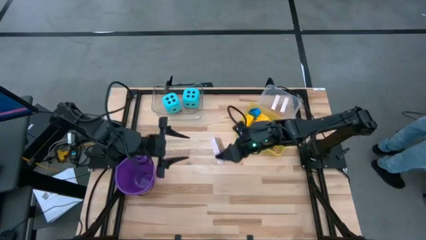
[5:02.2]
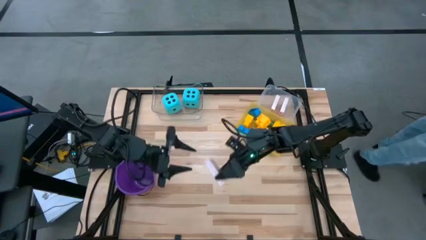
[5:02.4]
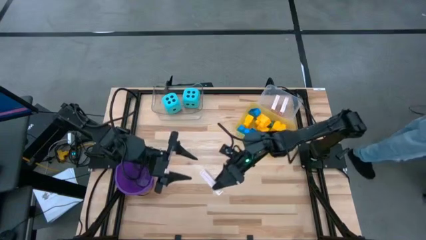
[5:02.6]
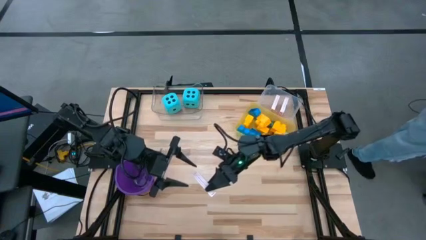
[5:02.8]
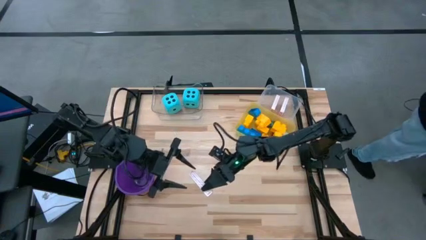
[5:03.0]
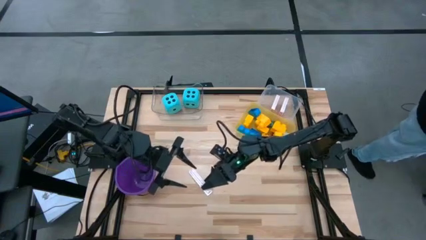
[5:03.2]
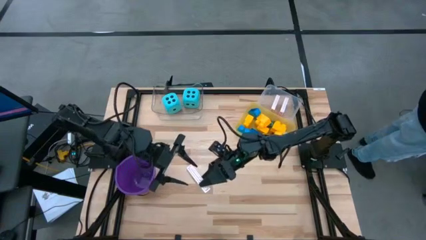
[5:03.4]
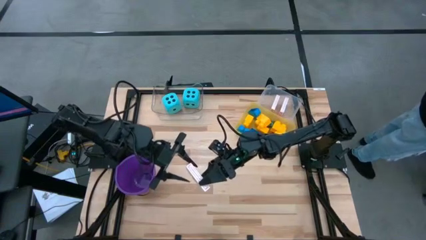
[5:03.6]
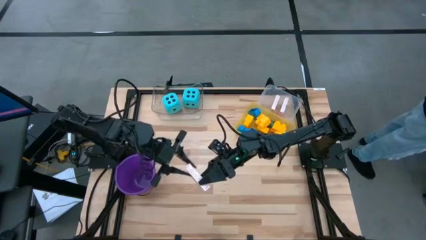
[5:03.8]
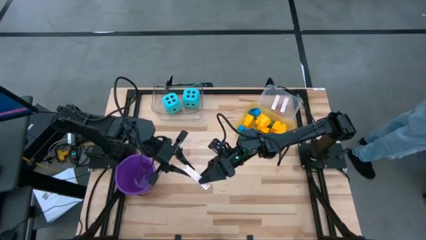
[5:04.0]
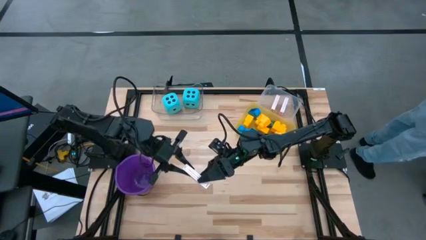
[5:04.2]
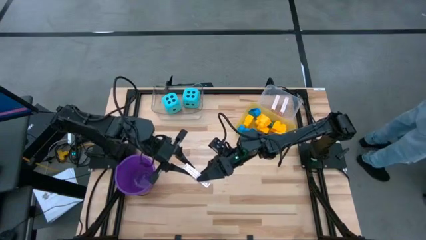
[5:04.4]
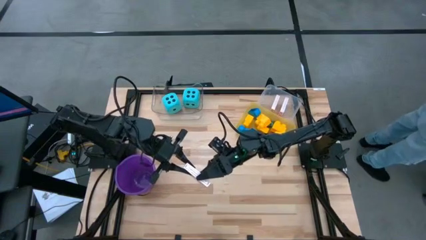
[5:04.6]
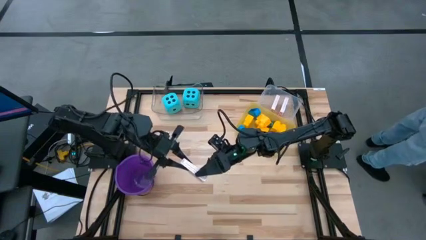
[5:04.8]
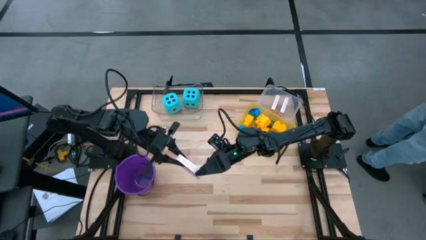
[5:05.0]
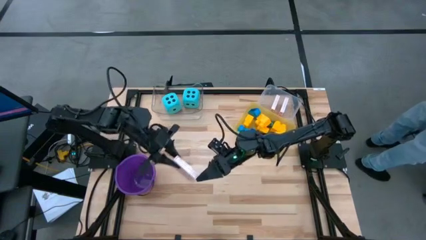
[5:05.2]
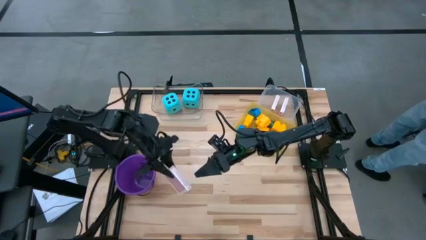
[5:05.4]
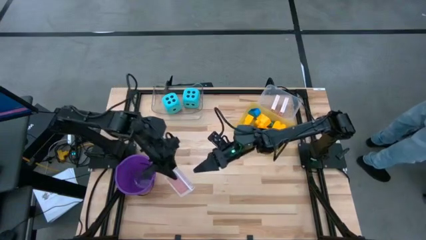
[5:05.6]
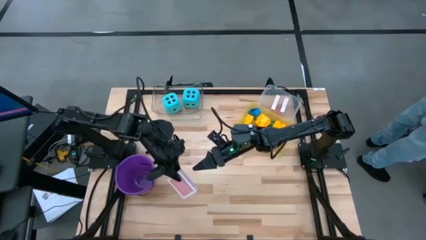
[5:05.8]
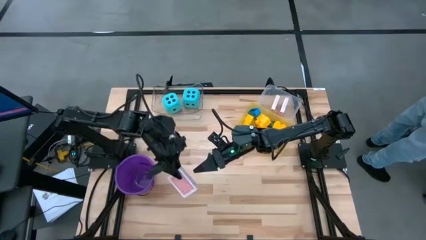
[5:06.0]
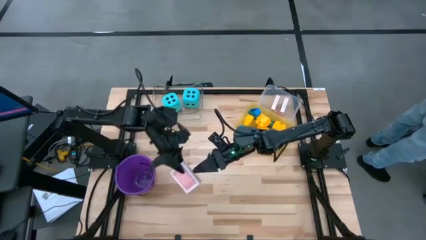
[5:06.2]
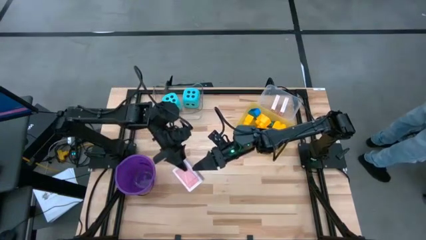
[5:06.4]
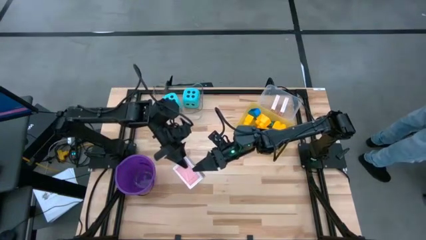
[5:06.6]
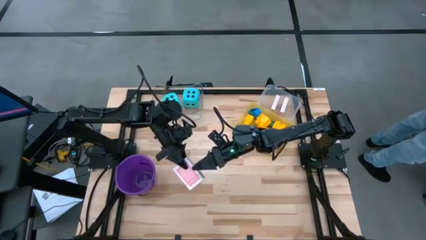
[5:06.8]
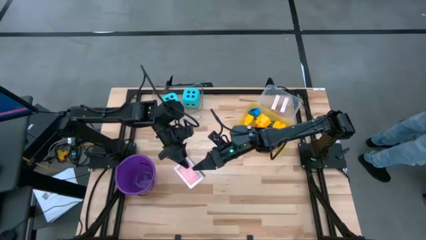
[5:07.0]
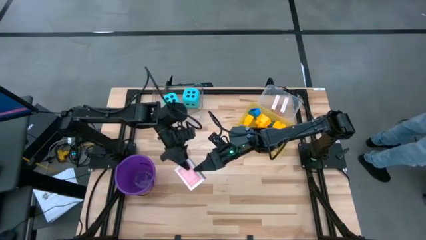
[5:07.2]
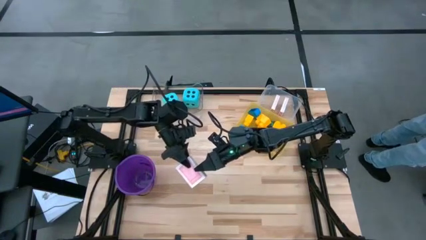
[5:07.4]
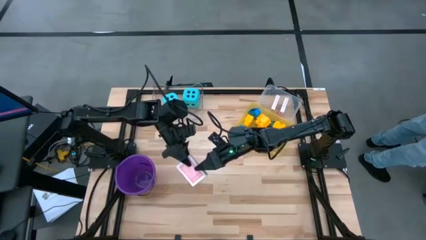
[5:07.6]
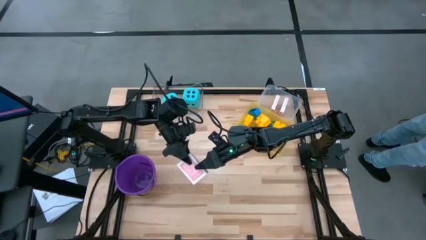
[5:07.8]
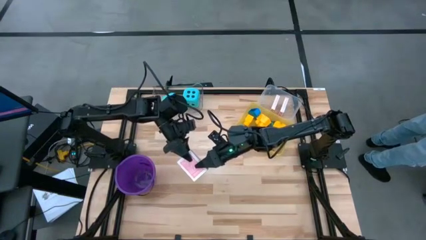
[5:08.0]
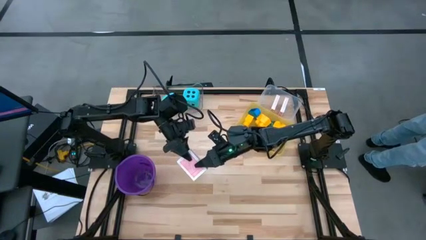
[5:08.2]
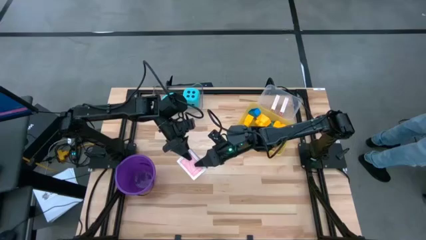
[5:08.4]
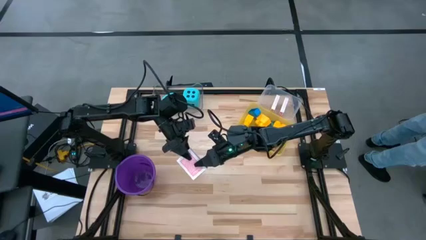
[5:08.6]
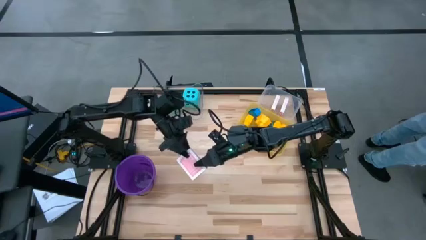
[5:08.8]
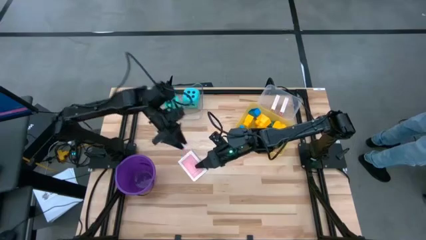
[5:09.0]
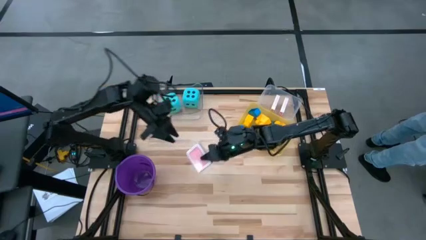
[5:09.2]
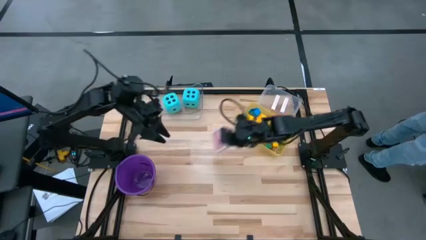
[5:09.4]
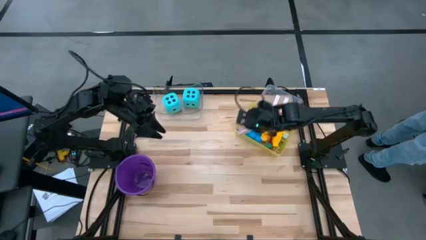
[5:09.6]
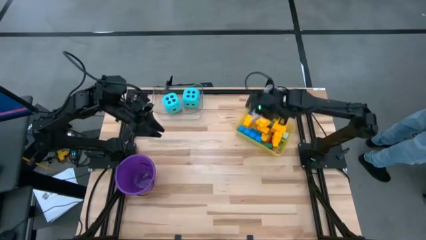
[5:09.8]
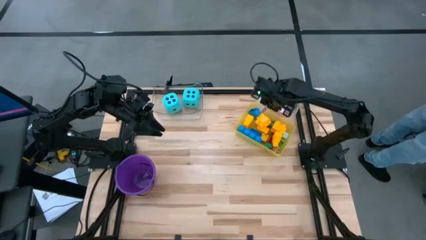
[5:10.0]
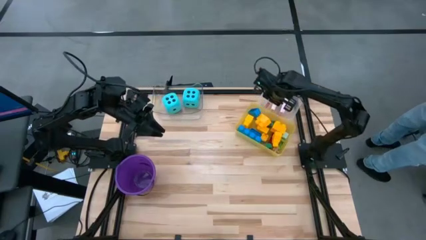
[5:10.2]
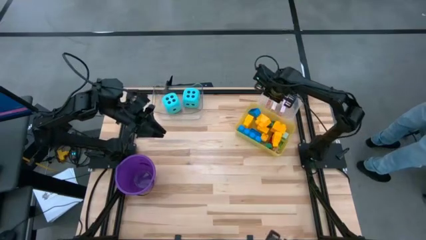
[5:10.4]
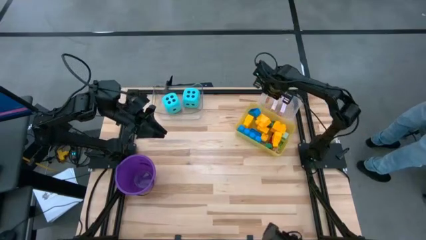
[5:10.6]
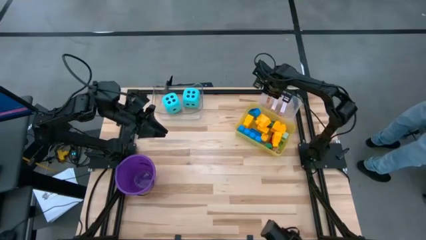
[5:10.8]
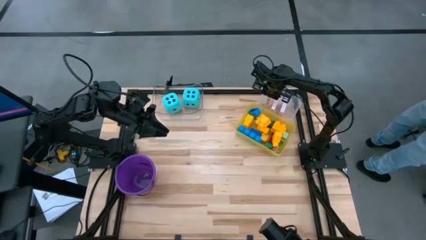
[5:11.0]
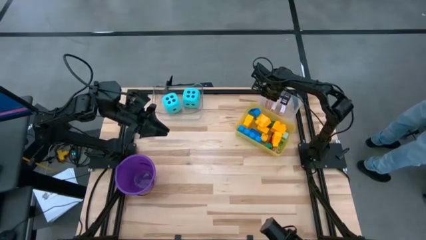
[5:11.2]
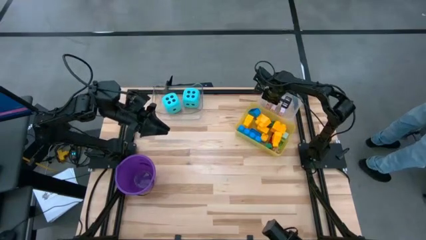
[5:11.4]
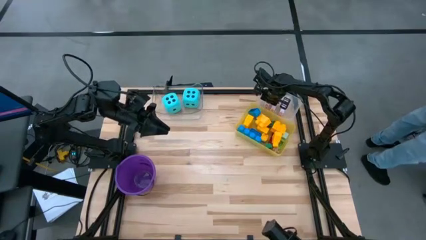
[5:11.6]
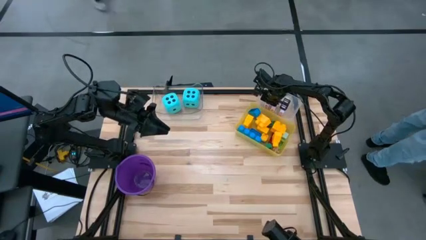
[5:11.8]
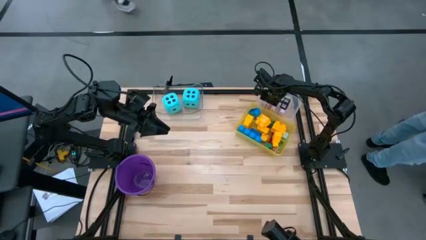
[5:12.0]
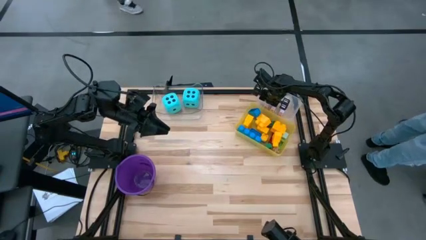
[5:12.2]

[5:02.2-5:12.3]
Task: Pick & Place Toys
Put the red deck of cards into the white bin
